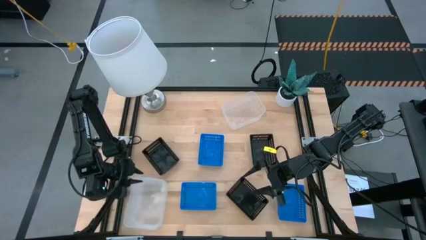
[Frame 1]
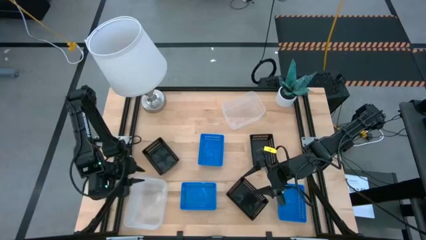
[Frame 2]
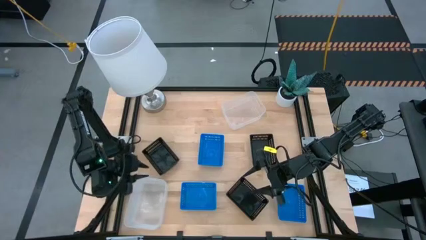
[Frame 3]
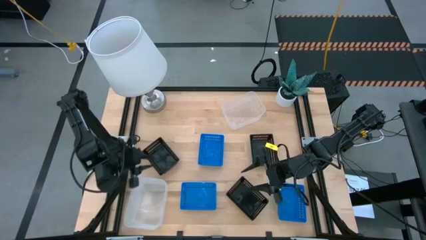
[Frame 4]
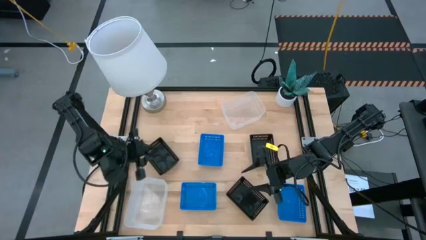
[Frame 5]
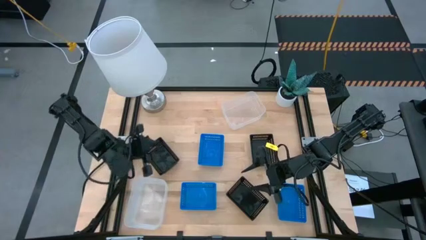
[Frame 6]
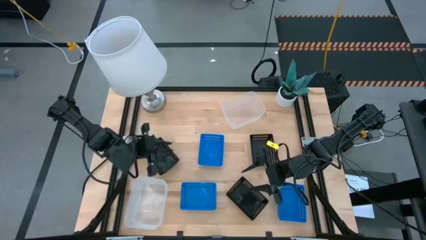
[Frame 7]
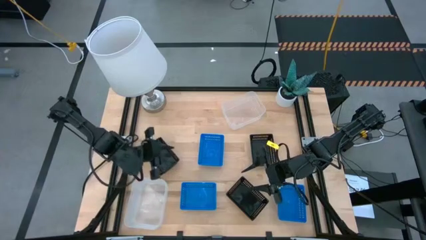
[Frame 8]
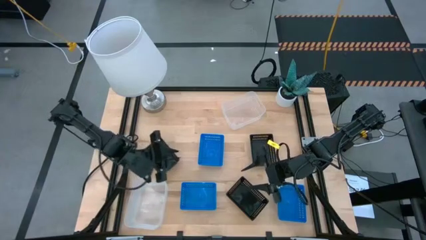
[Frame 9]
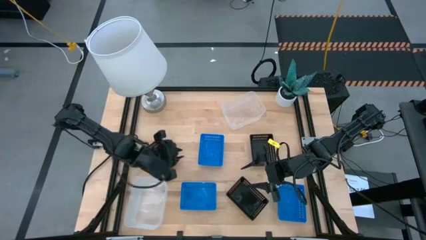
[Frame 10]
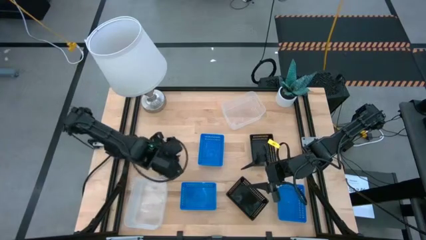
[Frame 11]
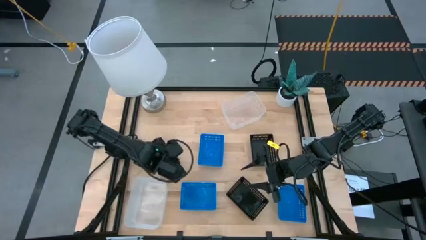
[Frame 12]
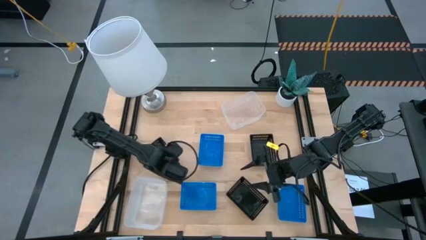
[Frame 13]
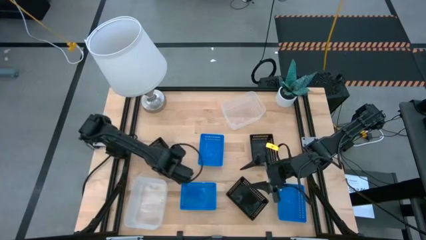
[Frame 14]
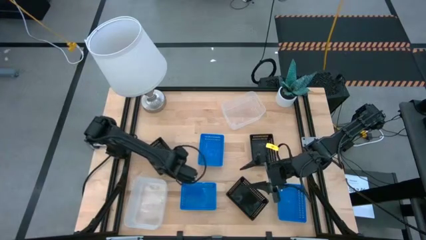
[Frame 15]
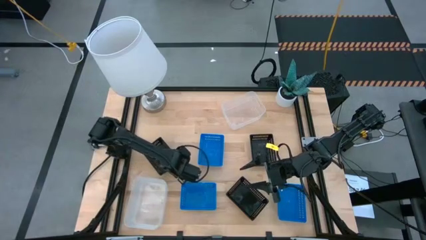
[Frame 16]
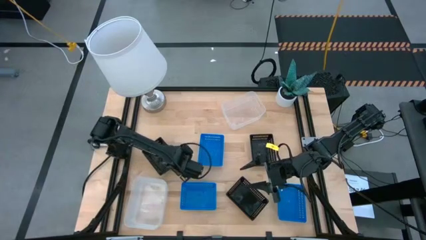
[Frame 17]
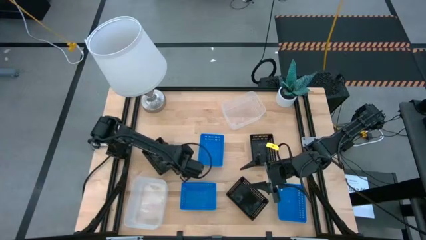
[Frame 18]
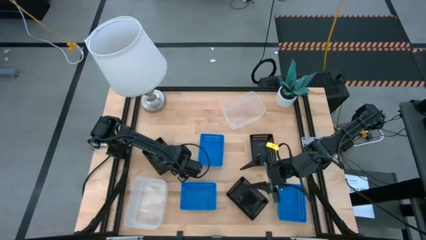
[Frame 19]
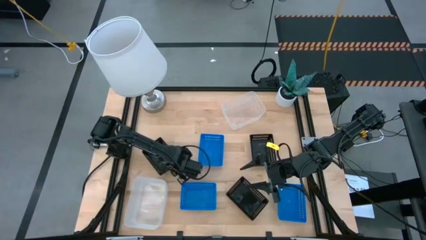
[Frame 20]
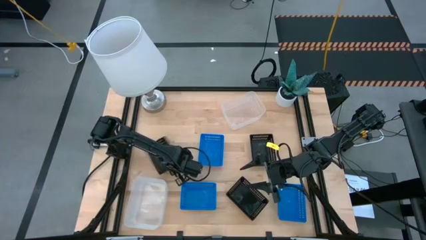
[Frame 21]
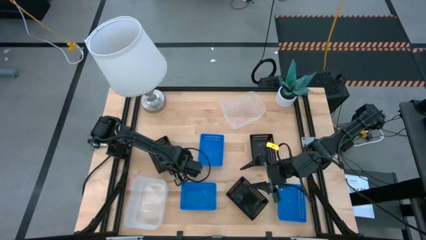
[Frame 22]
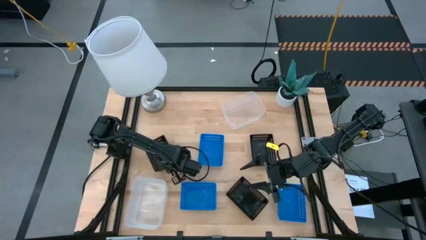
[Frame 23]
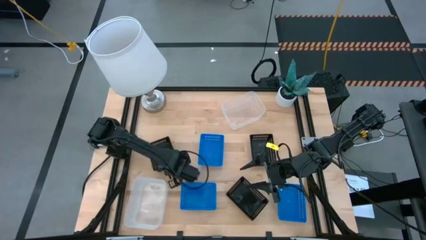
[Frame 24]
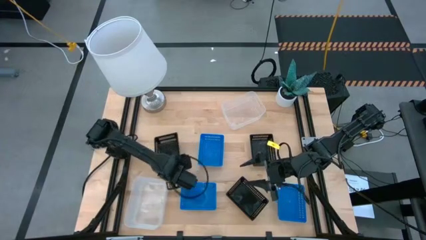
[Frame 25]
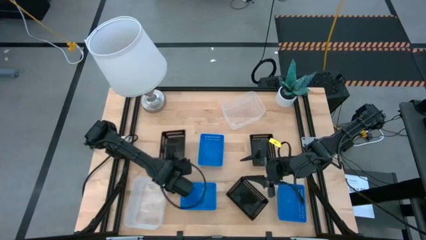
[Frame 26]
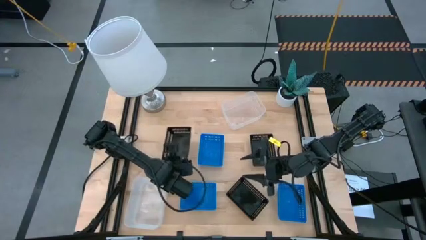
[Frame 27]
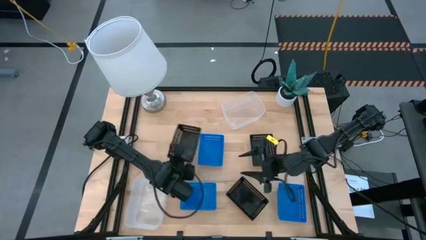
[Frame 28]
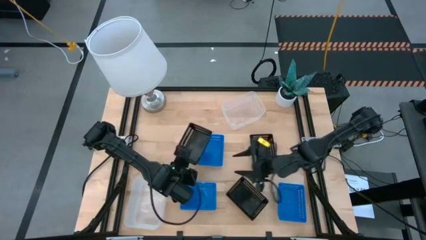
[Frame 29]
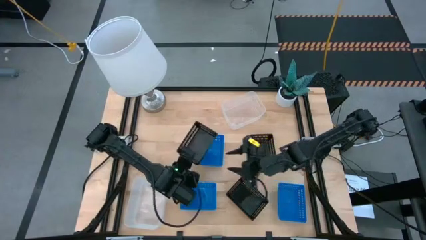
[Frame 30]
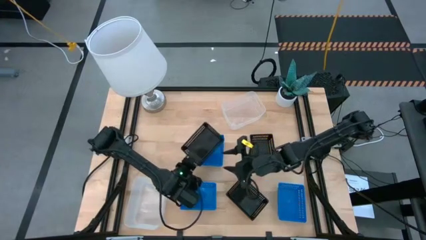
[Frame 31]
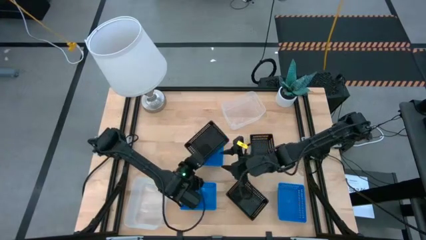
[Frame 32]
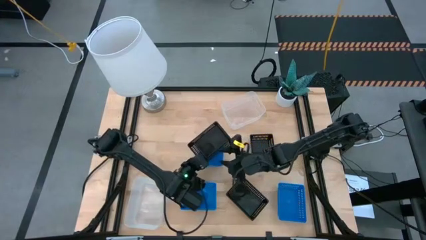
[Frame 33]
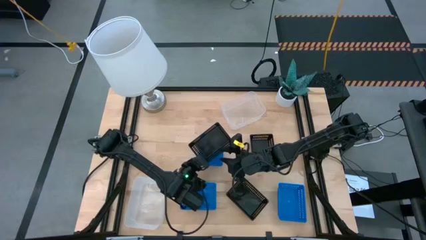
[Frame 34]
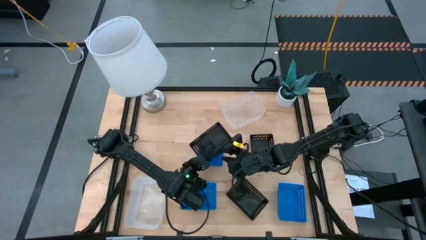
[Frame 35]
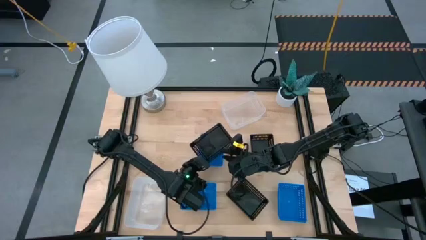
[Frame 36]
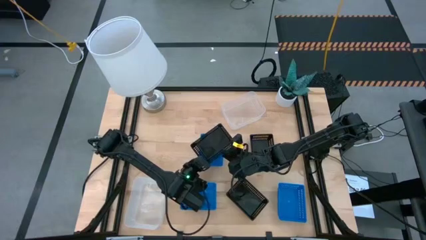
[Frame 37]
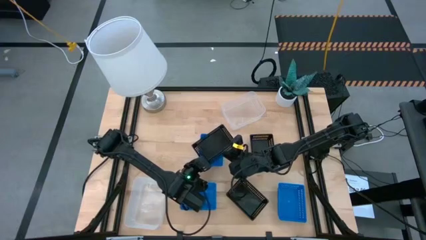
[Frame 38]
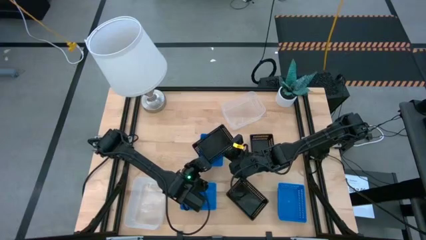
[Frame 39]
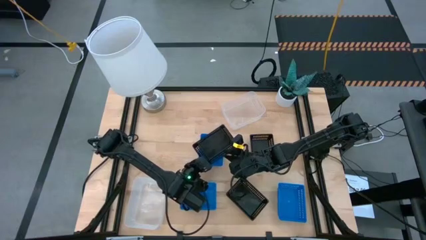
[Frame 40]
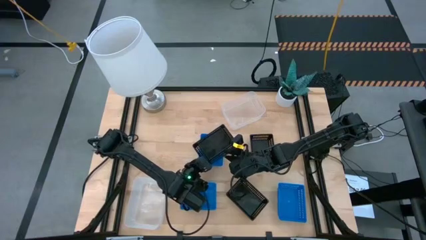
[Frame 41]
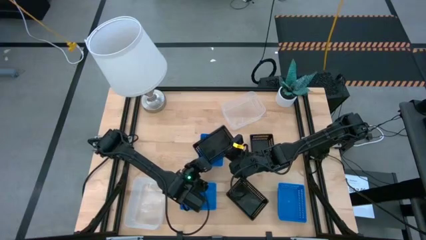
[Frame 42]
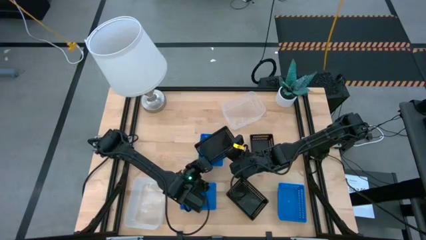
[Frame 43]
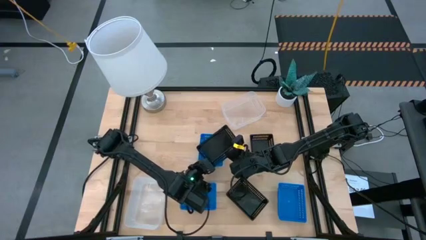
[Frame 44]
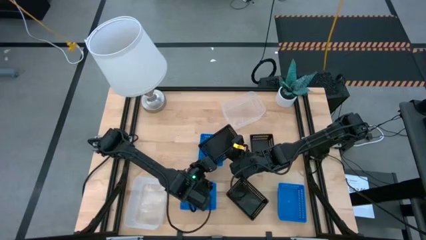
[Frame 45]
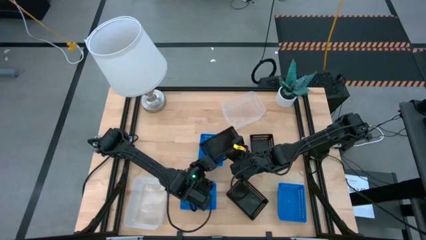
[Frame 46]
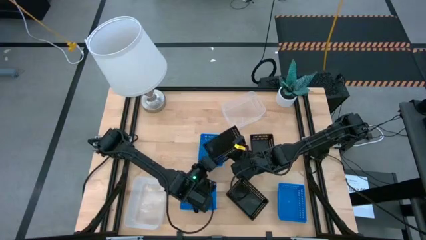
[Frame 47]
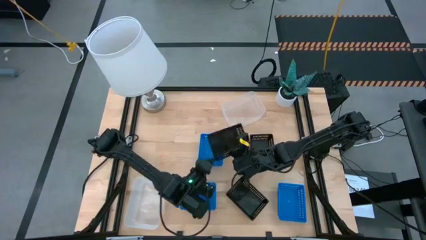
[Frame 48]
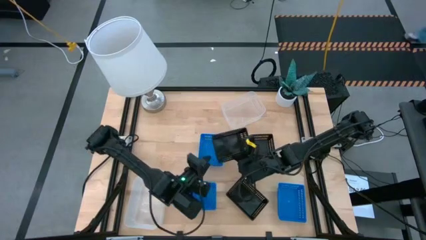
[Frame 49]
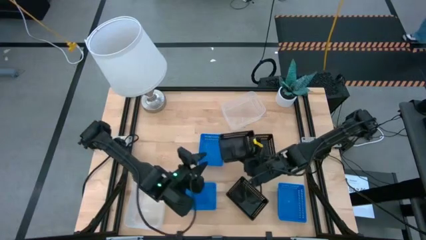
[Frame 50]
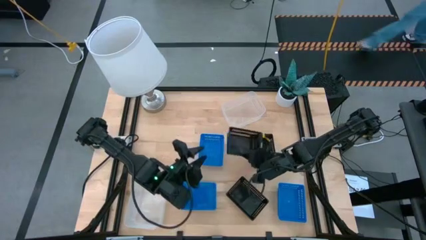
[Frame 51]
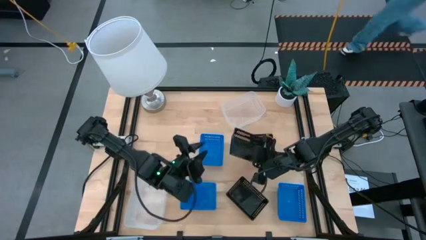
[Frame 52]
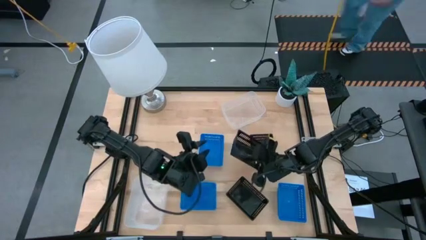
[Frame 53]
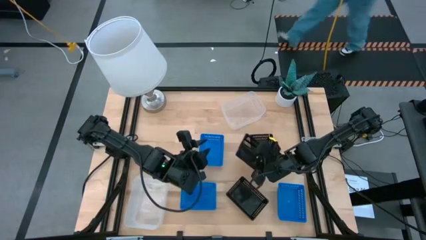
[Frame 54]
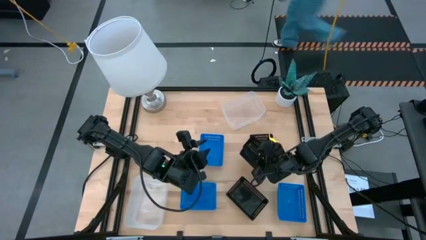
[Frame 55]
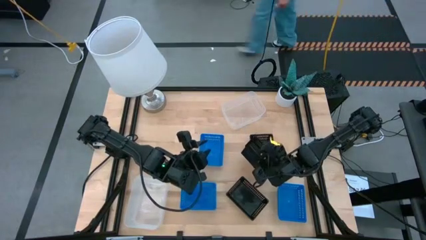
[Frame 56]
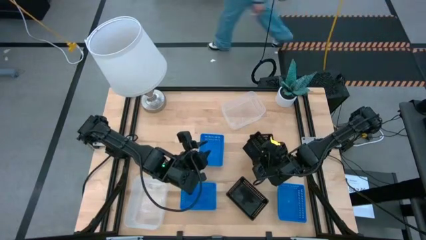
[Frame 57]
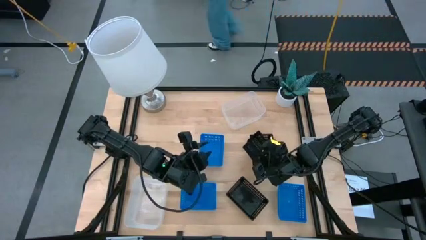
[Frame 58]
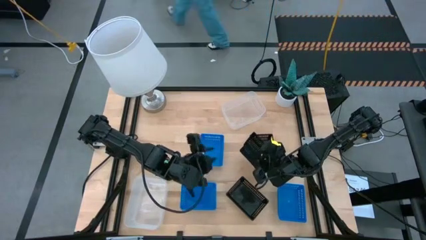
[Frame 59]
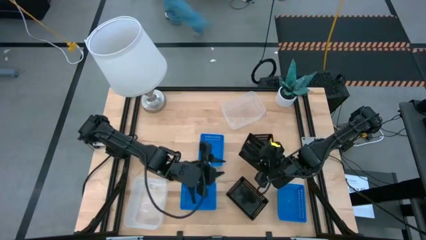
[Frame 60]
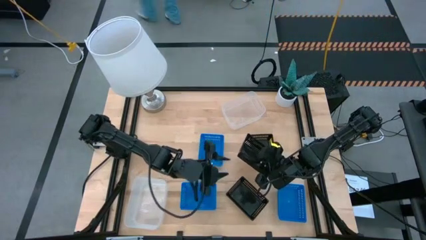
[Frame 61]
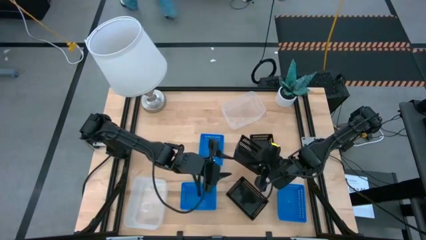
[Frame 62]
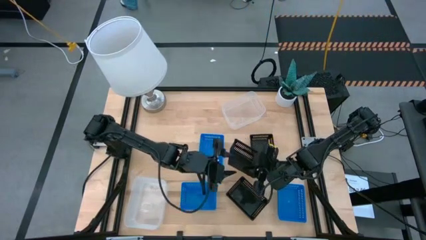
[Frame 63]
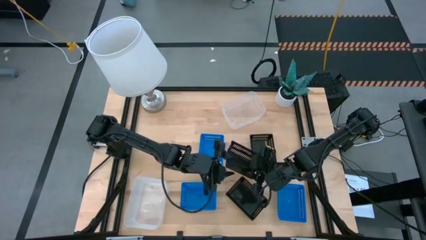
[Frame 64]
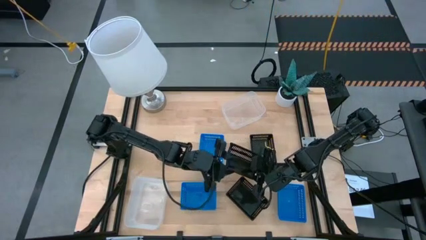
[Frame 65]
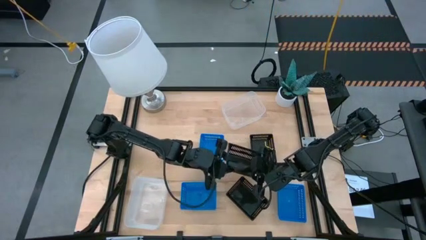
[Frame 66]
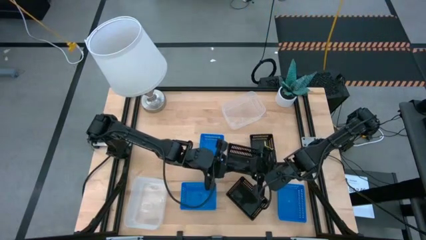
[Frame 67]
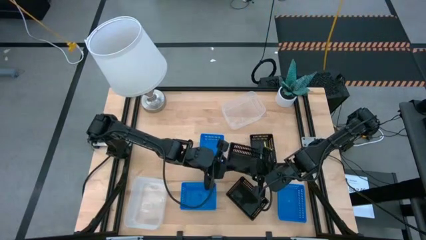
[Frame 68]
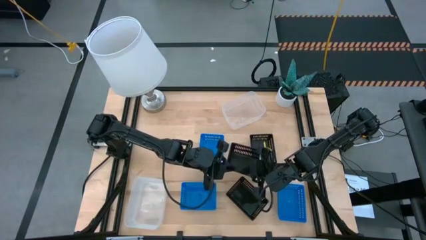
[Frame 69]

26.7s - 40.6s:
Stack the top left black bin on the top right black bin
